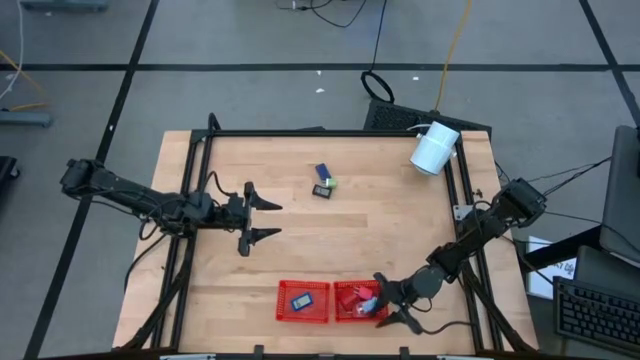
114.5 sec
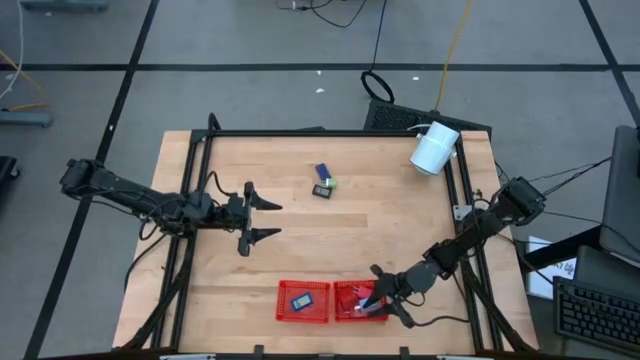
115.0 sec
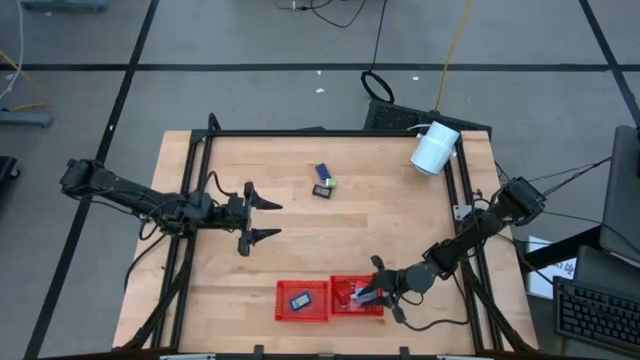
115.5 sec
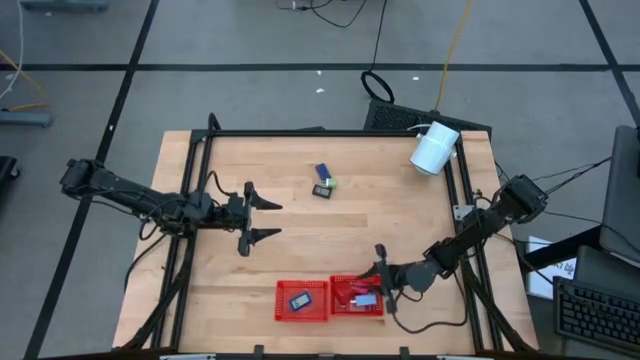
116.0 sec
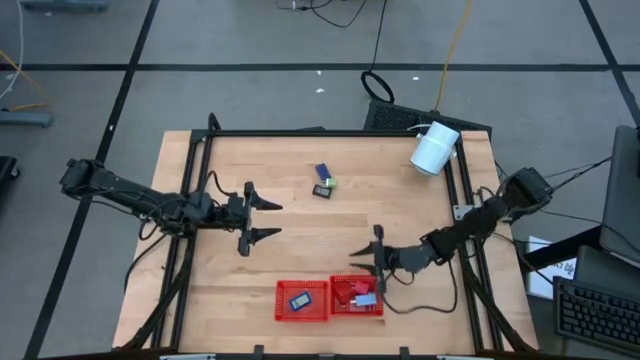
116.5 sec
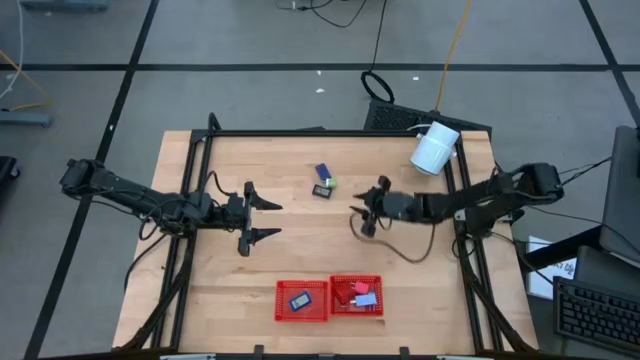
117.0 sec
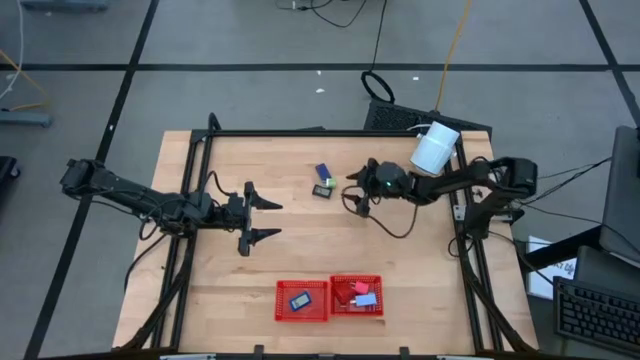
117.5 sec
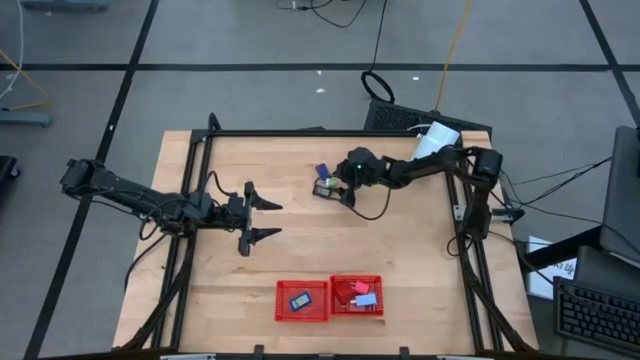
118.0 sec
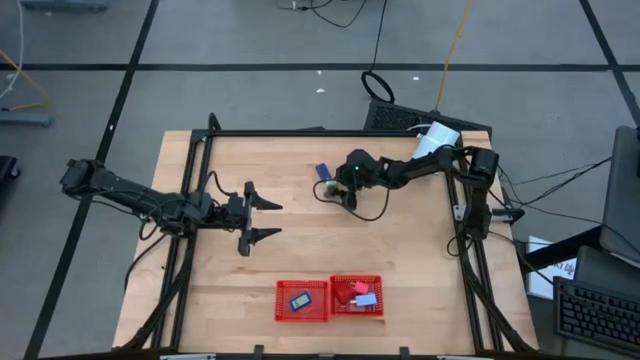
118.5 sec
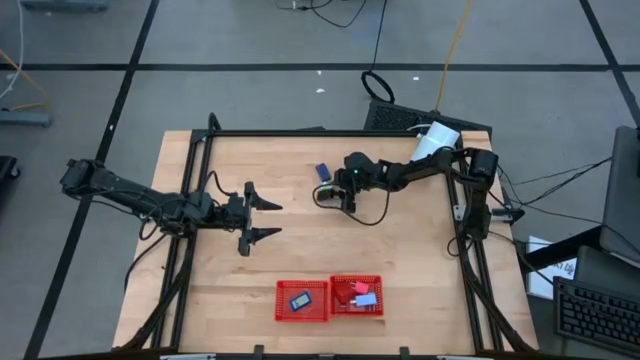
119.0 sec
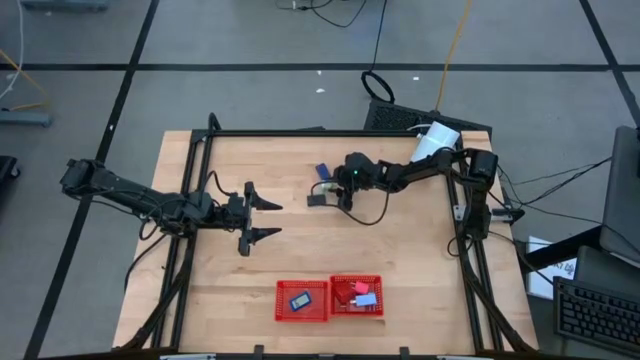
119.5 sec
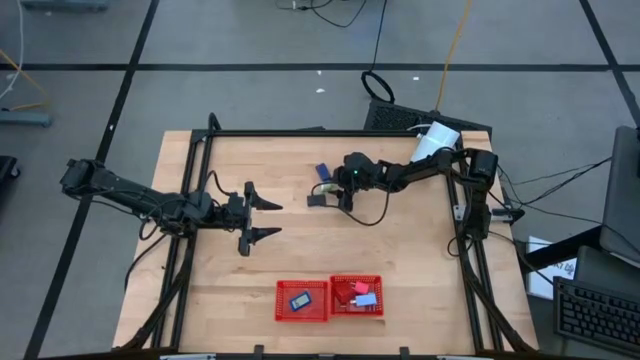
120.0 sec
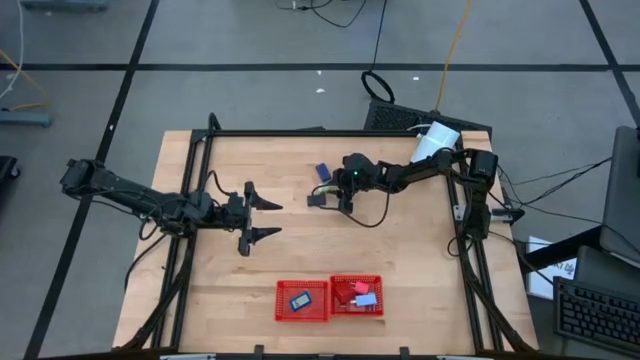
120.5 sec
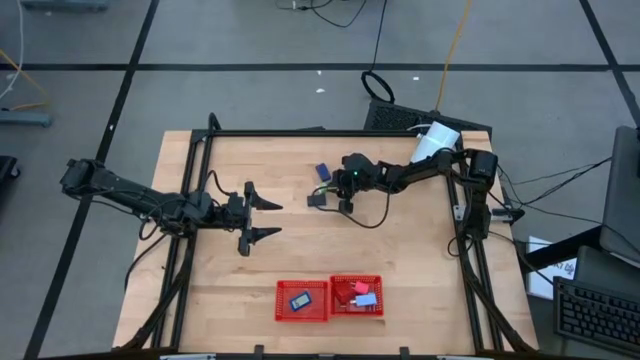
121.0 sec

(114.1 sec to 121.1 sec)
Task: Pick & Place Office items
Put the green charger adapter into the right red bin

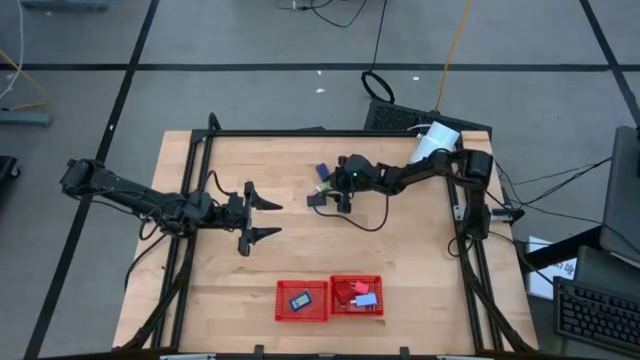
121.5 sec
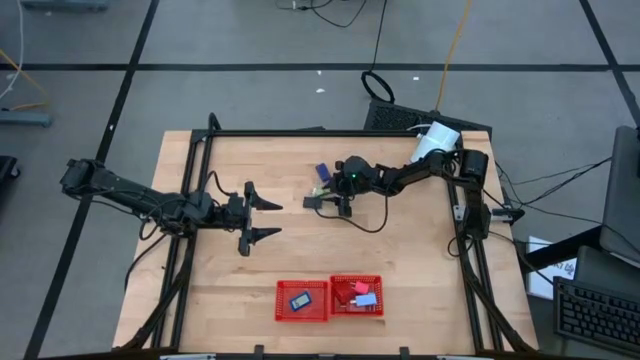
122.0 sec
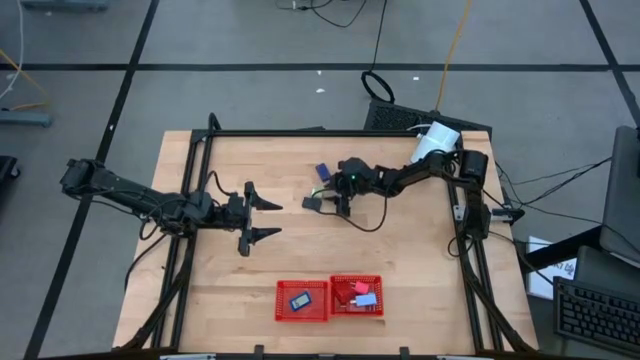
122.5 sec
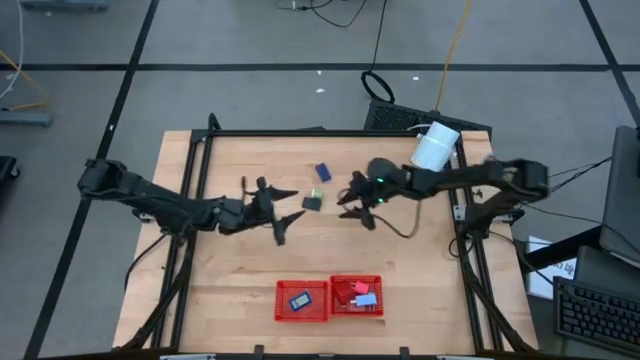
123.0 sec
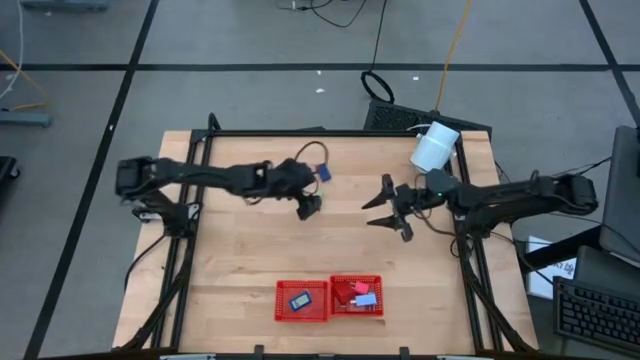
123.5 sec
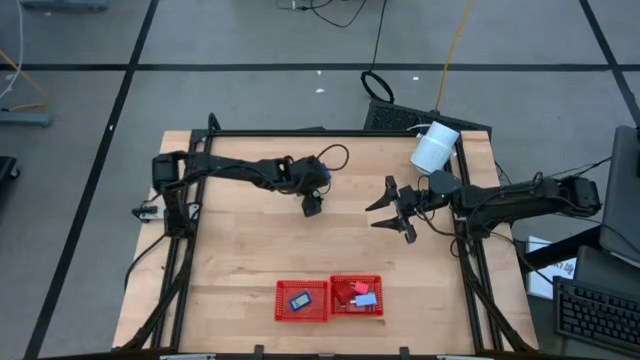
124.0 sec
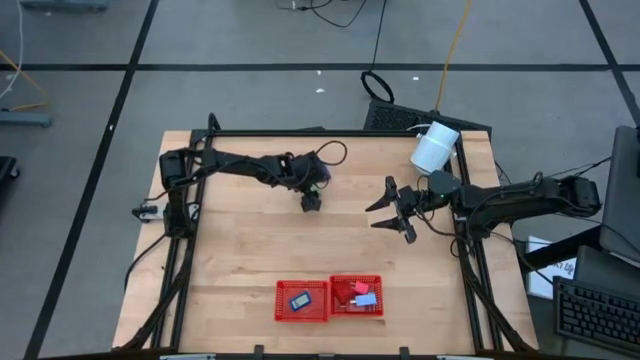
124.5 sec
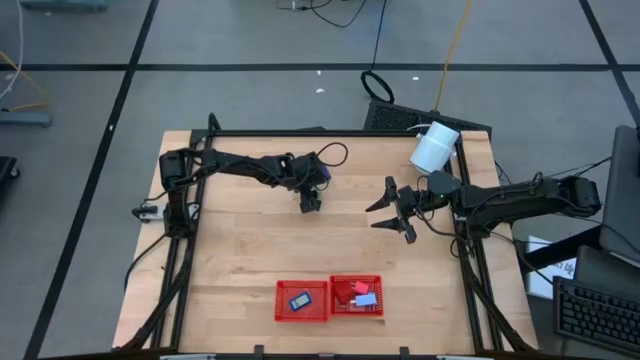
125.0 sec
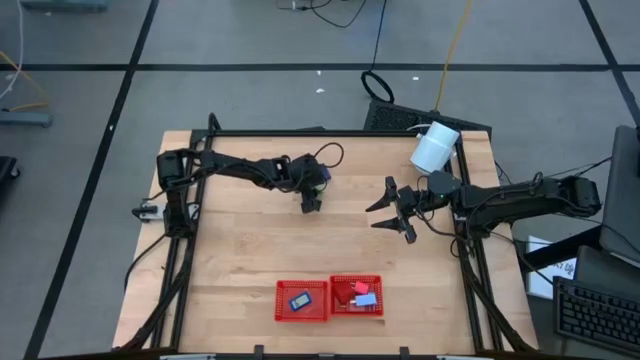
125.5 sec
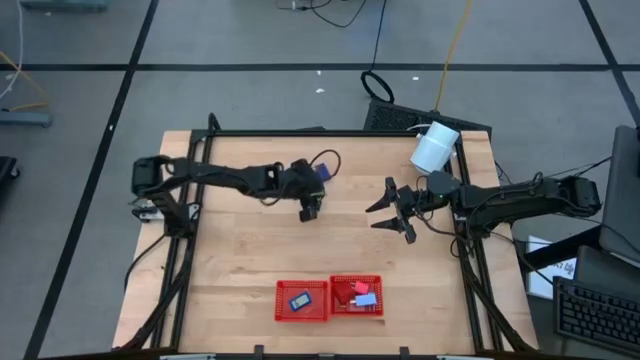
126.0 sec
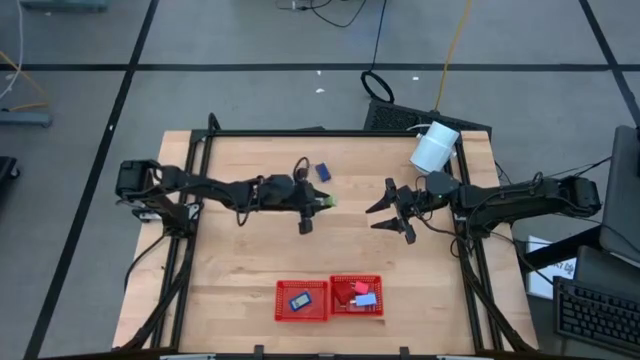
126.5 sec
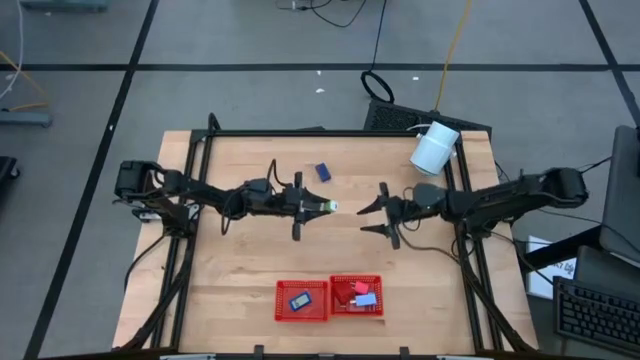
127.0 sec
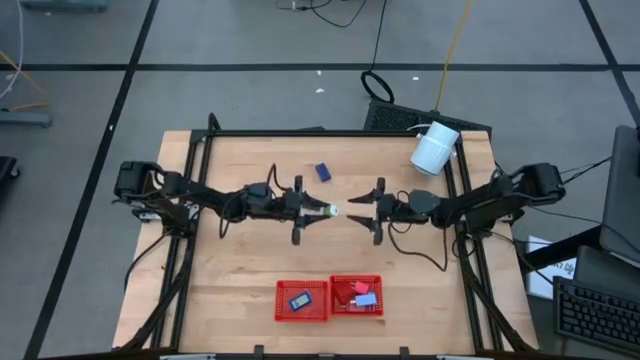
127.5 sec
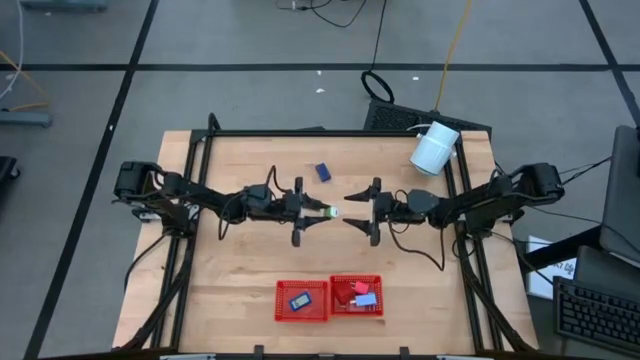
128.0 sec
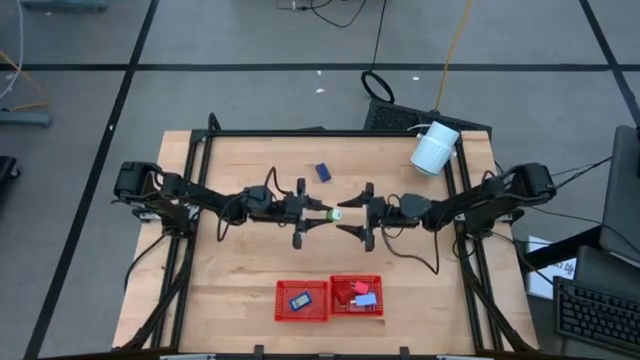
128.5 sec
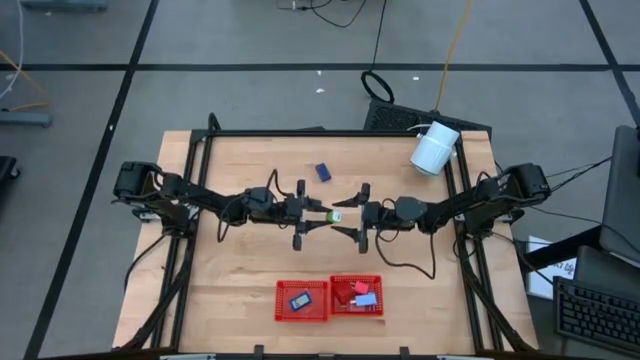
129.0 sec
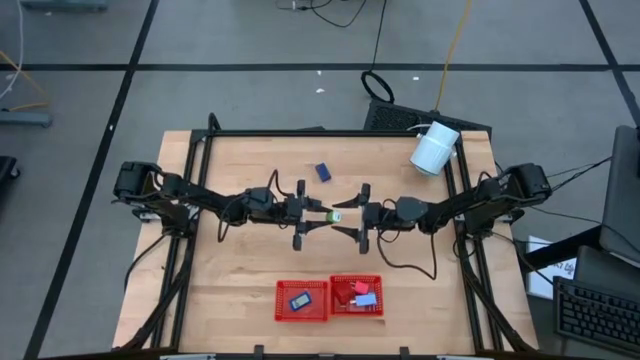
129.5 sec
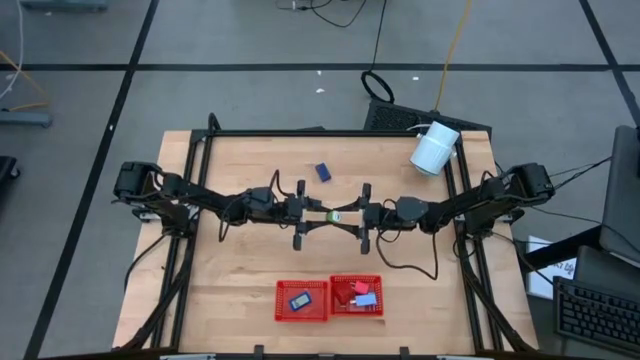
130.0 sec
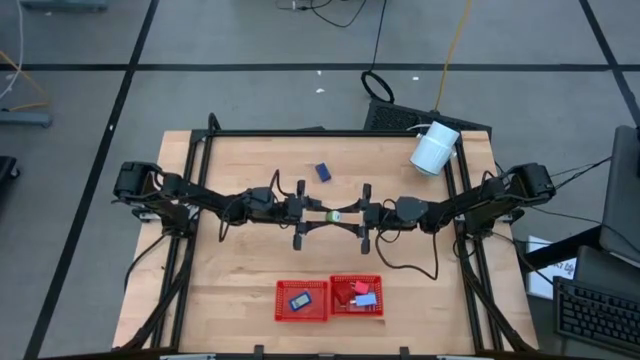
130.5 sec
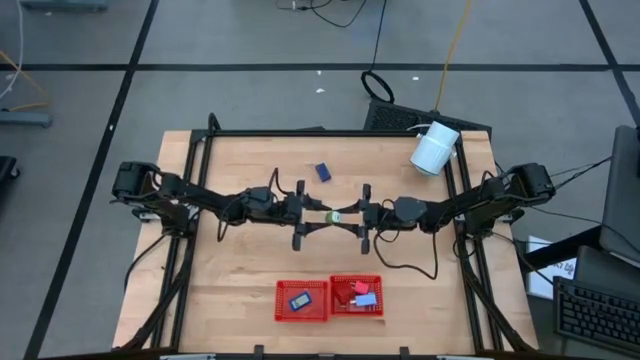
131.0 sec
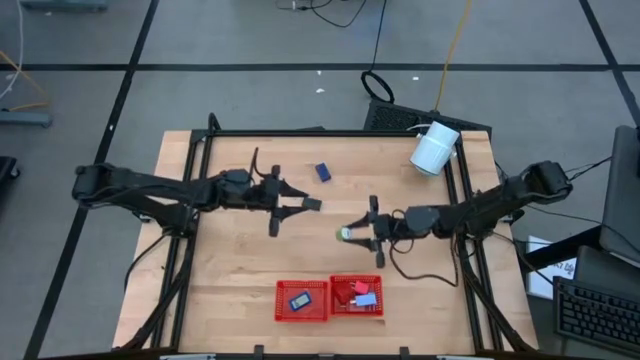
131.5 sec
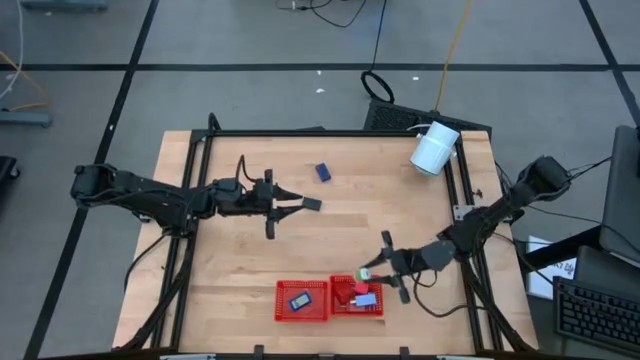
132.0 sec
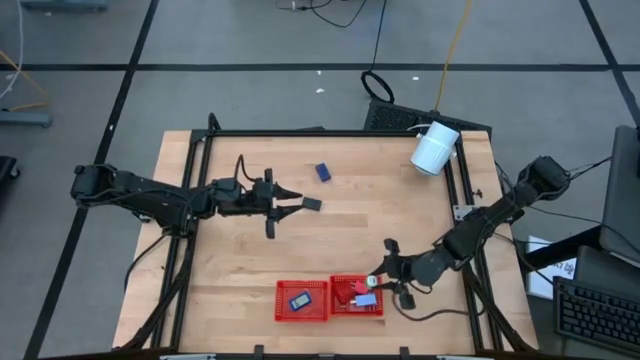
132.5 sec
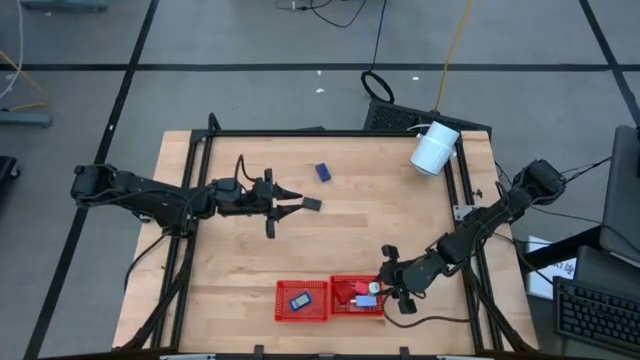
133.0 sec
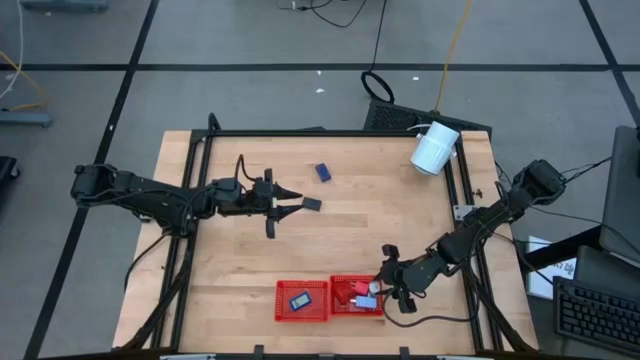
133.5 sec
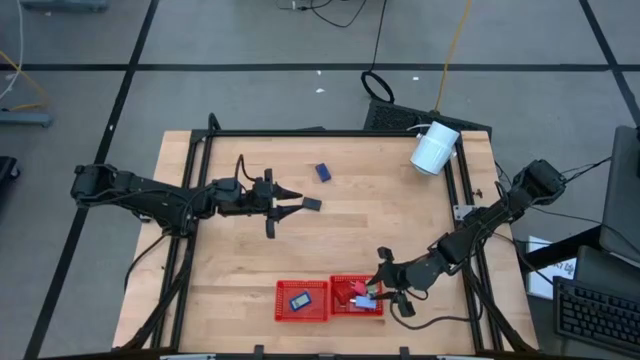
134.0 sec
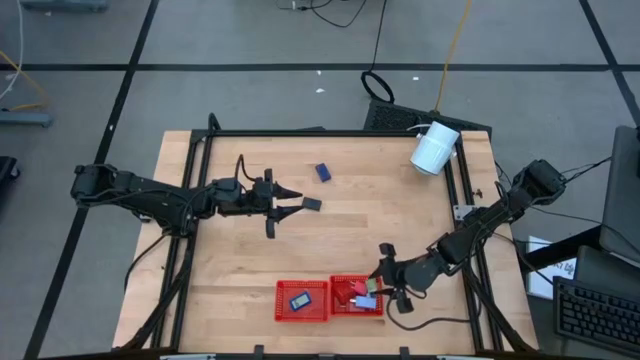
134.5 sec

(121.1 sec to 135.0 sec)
Put the green charger adapter into the right red bin

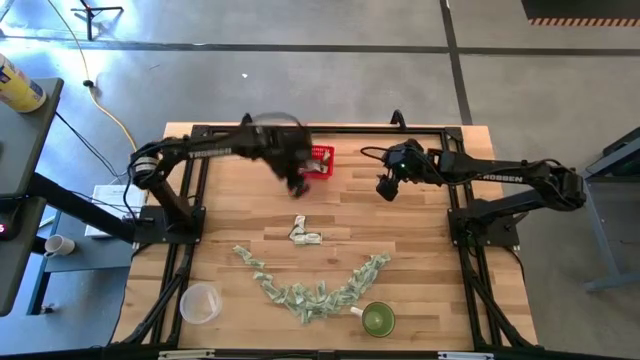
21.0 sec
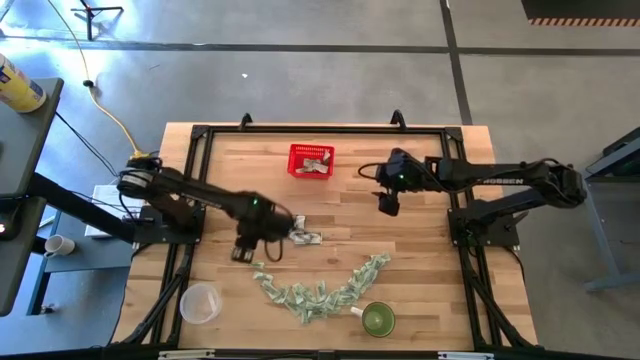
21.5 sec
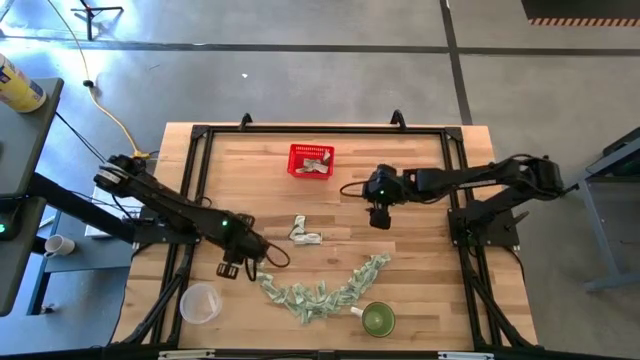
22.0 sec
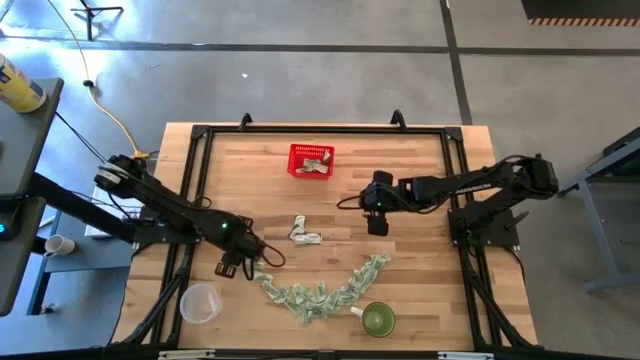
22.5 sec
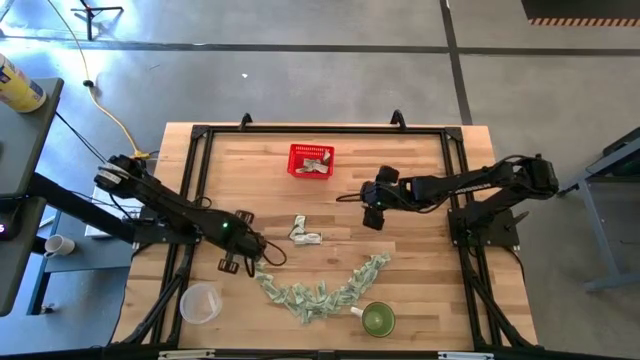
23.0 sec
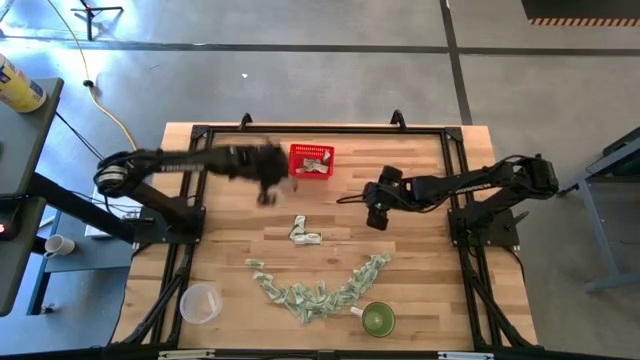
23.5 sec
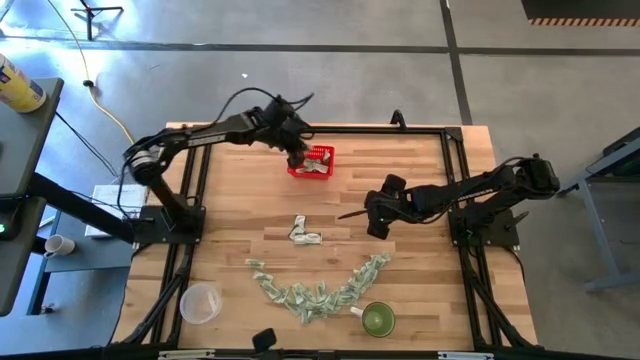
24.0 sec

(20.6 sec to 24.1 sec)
Task: Pick and place items into bin
Put the light green stevia packet into the red bin
